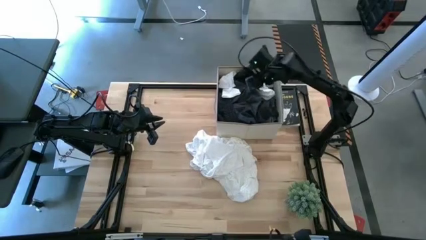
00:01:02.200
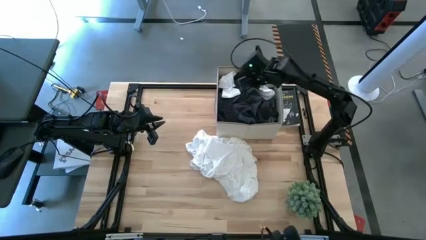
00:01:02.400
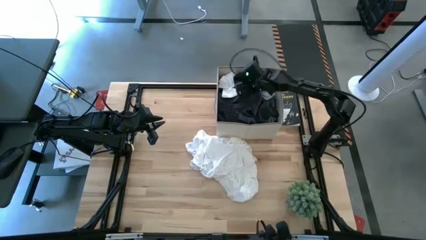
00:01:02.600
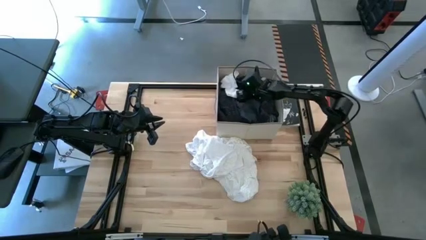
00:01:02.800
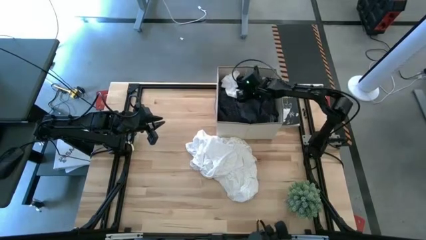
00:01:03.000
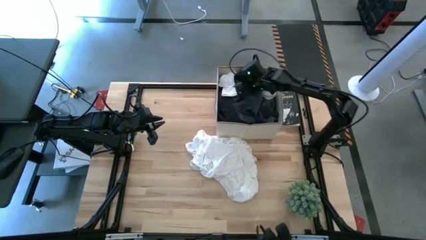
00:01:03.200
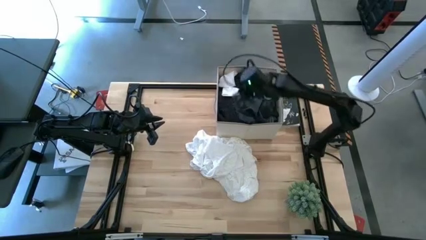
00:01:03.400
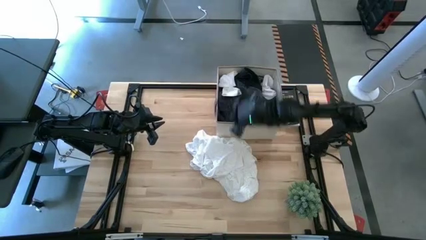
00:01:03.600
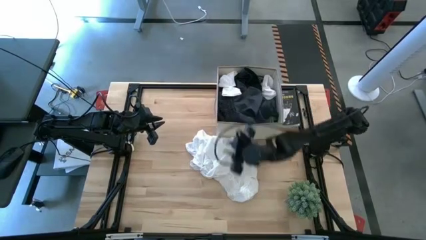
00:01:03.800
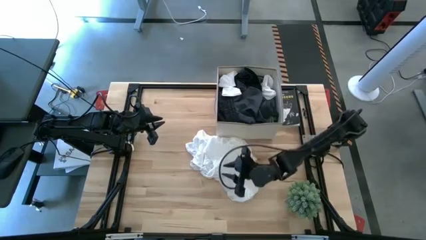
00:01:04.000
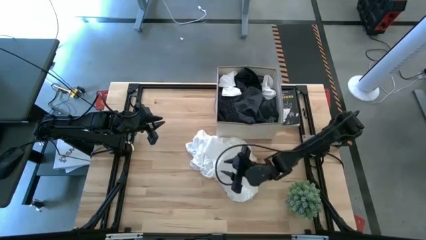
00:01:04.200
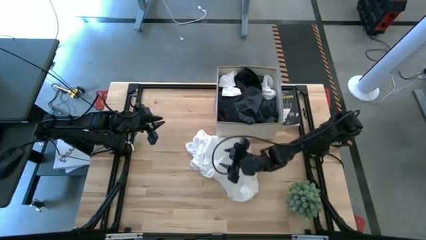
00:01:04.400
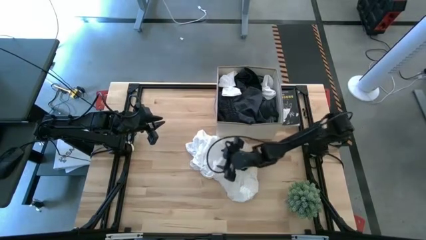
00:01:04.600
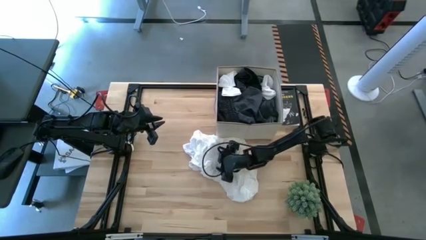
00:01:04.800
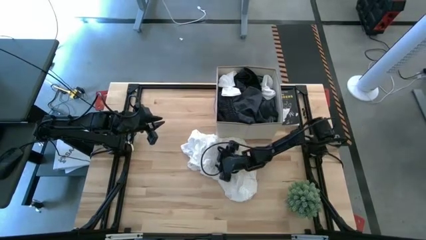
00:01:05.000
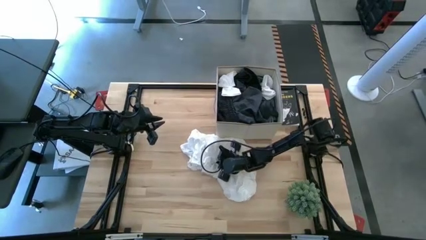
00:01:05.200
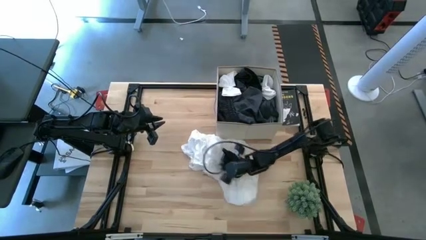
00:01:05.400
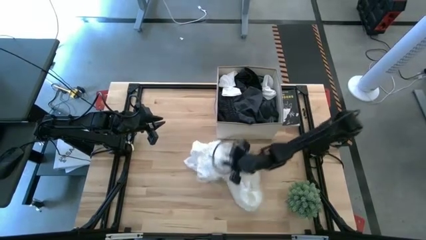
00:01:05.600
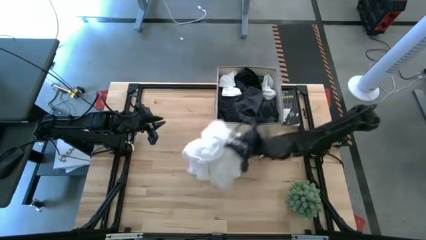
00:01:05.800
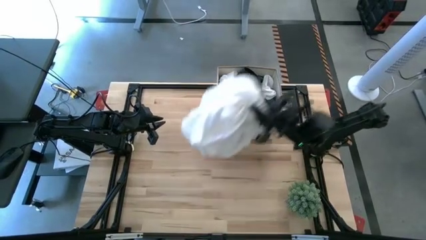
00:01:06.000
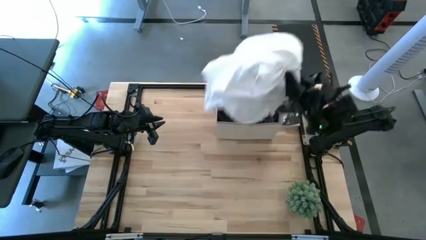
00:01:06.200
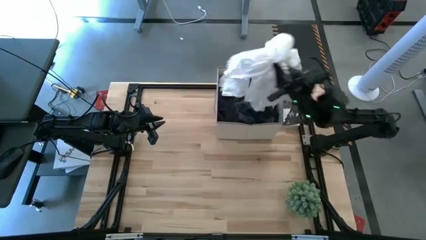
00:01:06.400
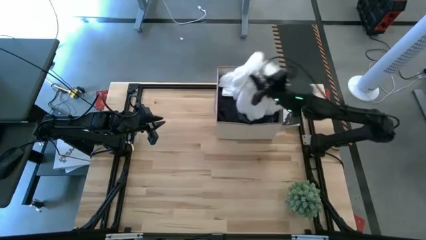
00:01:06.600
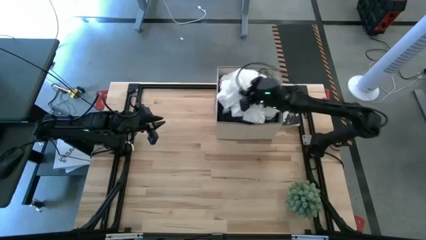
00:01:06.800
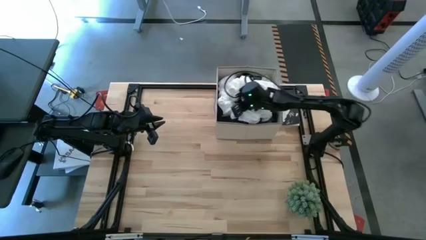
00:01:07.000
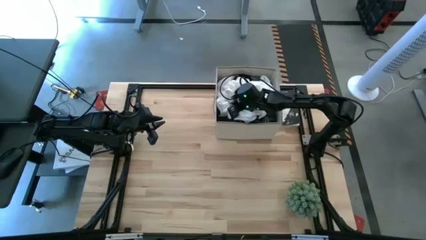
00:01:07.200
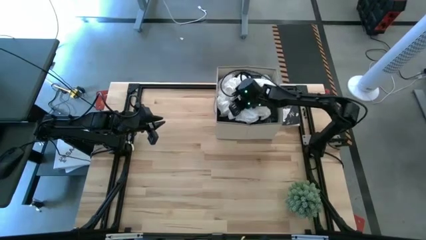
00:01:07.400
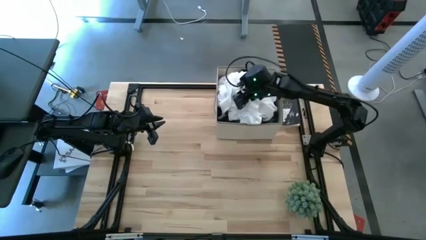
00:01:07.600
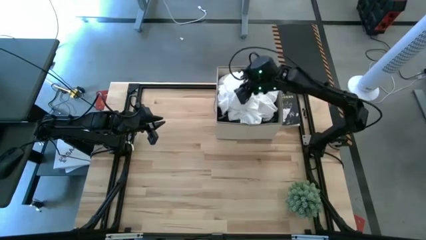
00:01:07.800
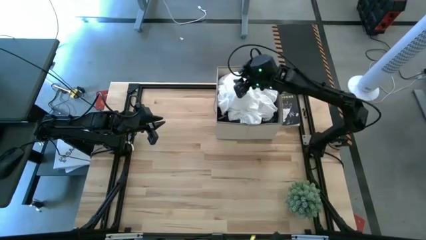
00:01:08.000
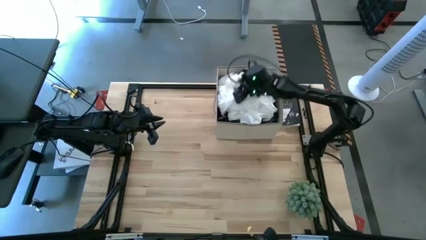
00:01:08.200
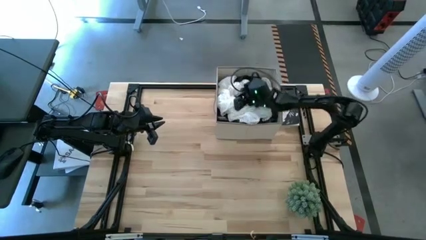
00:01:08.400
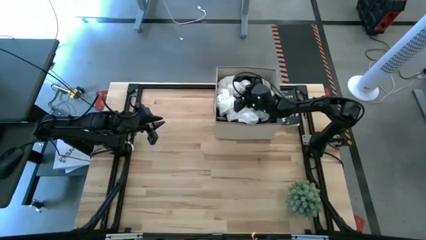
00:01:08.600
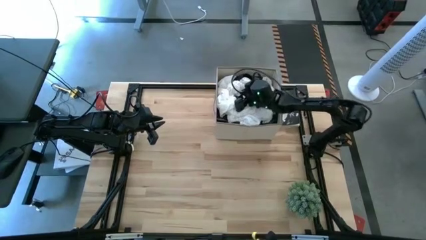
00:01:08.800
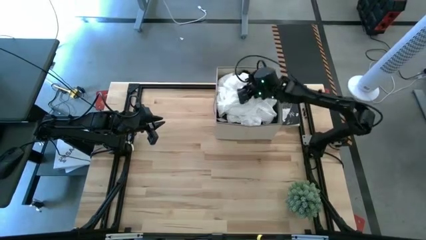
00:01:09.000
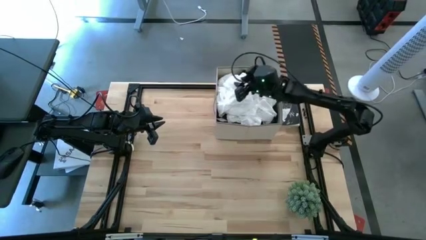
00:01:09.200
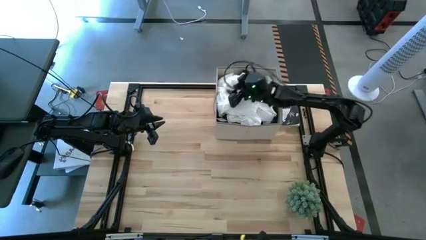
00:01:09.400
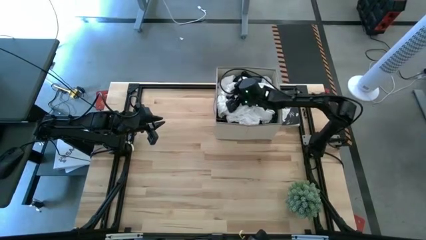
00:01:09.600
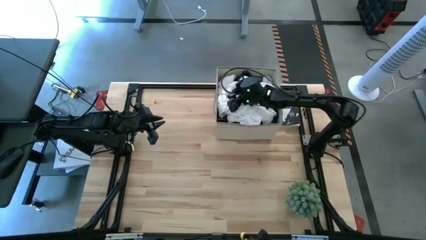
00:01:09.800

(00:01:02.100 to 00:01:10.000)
Task: Sort clothes
Put the white shirt into the laundry organizer

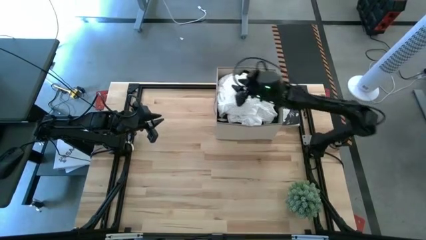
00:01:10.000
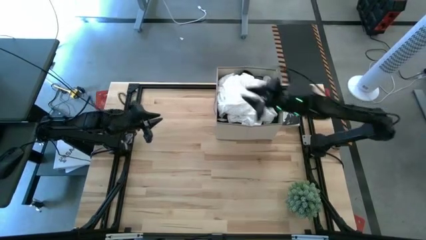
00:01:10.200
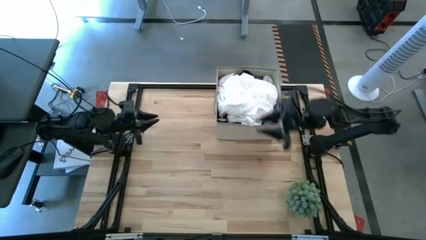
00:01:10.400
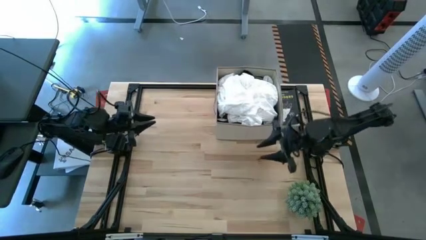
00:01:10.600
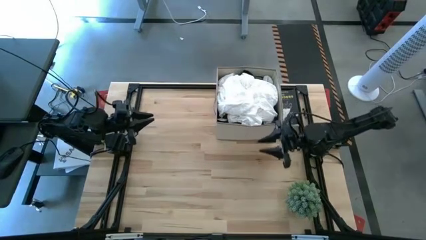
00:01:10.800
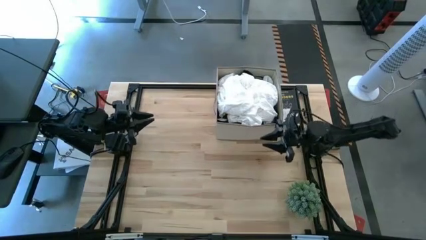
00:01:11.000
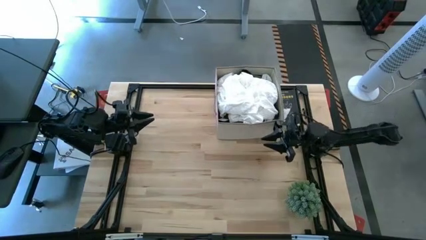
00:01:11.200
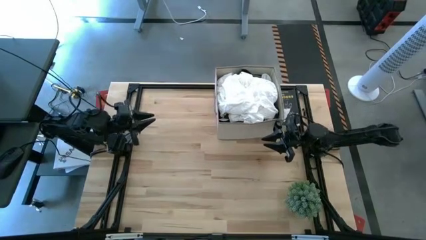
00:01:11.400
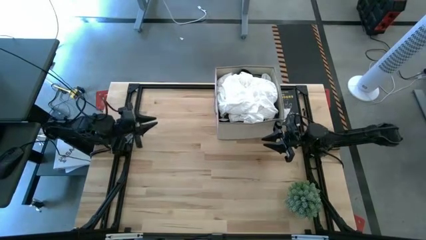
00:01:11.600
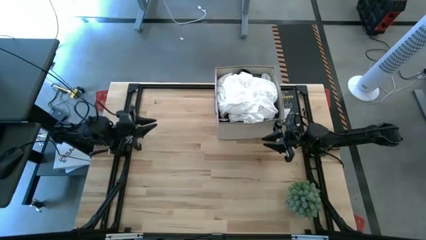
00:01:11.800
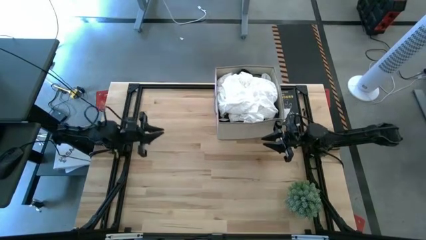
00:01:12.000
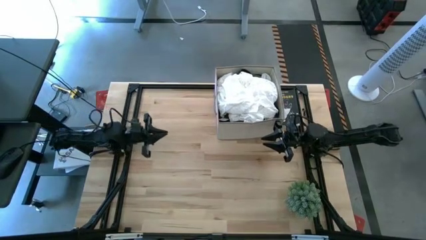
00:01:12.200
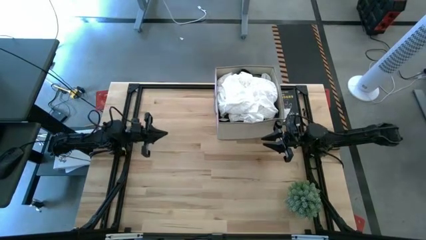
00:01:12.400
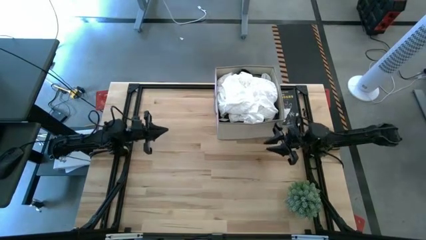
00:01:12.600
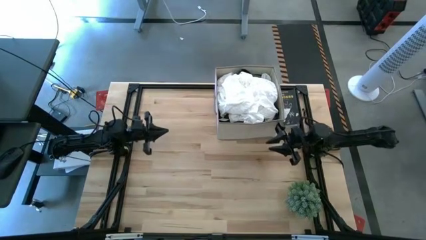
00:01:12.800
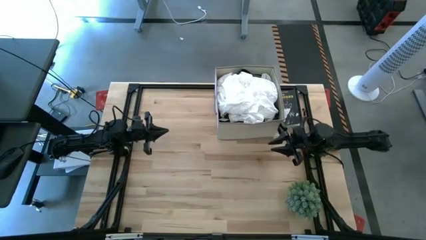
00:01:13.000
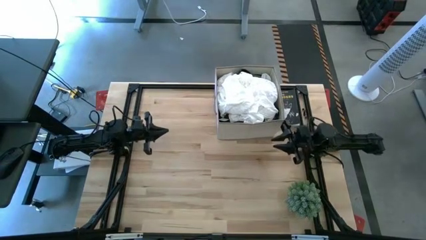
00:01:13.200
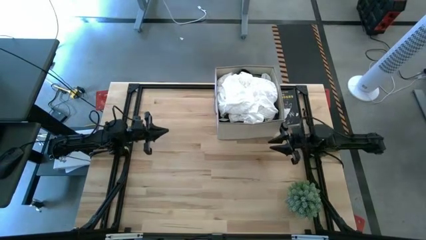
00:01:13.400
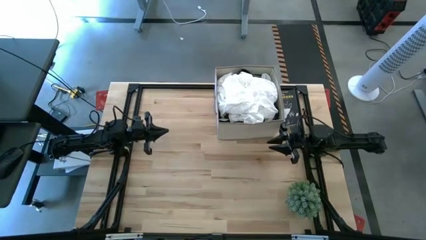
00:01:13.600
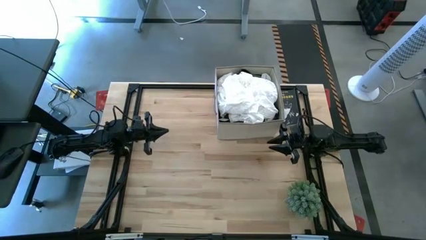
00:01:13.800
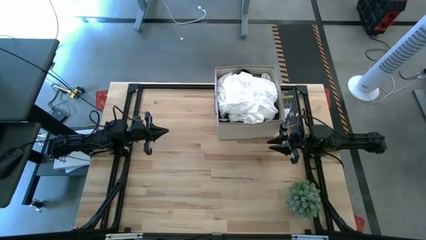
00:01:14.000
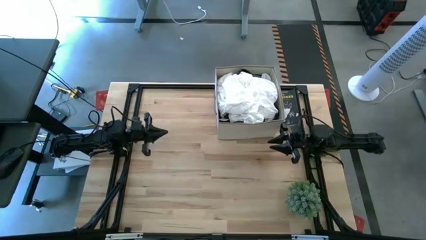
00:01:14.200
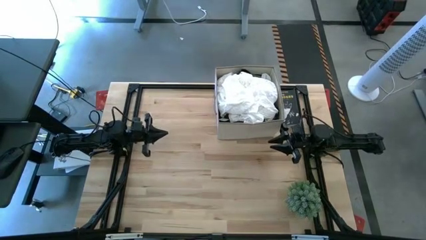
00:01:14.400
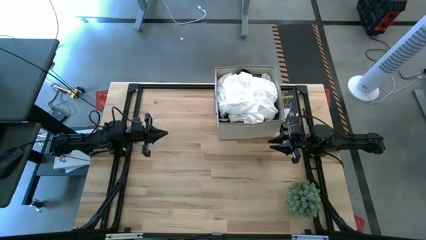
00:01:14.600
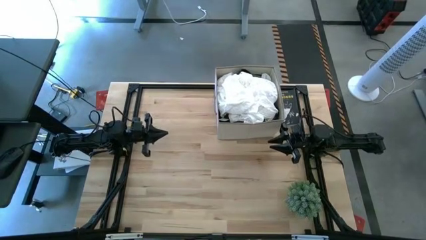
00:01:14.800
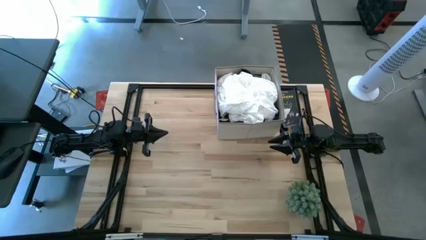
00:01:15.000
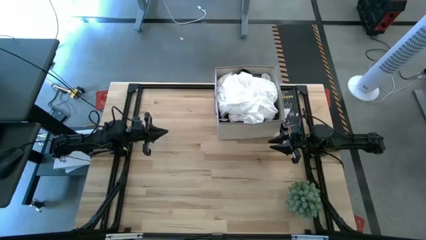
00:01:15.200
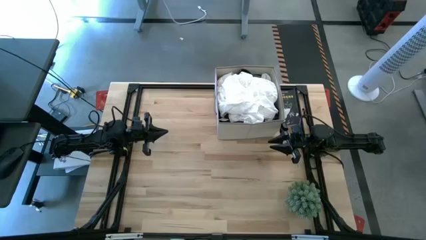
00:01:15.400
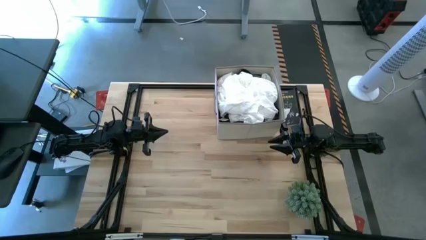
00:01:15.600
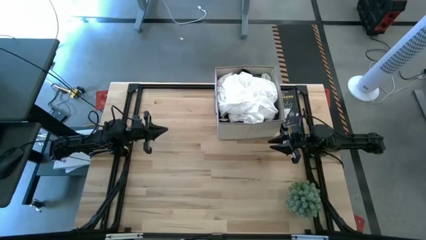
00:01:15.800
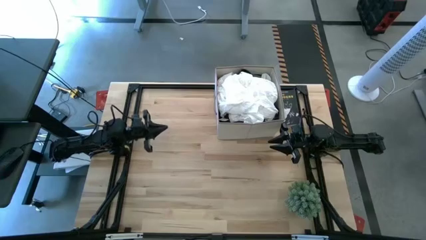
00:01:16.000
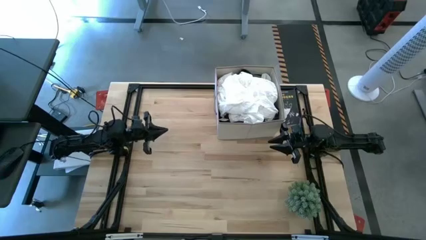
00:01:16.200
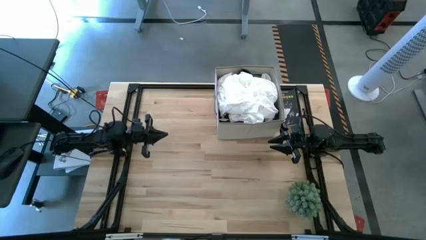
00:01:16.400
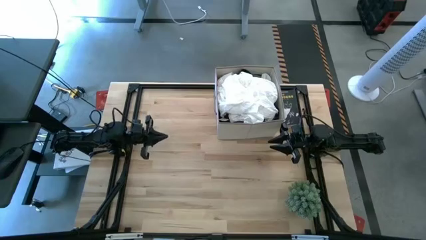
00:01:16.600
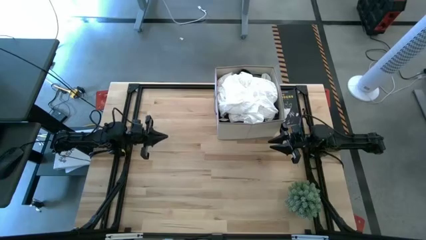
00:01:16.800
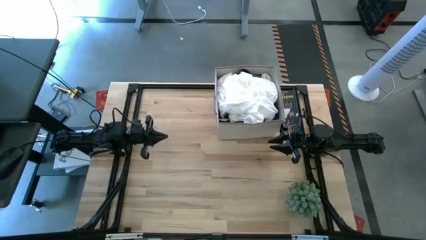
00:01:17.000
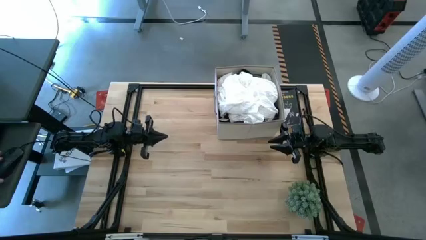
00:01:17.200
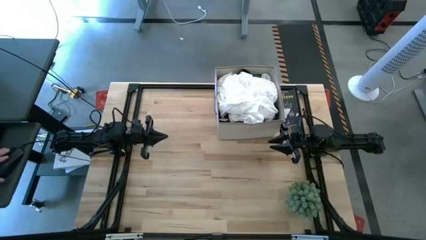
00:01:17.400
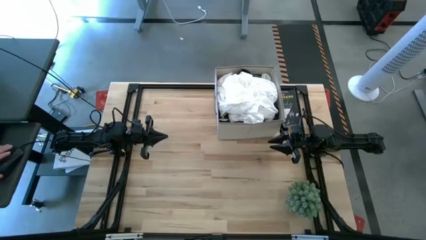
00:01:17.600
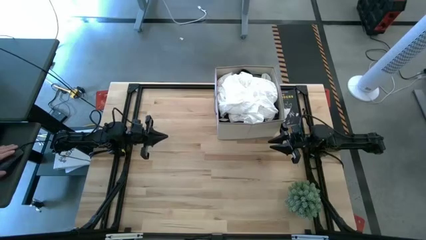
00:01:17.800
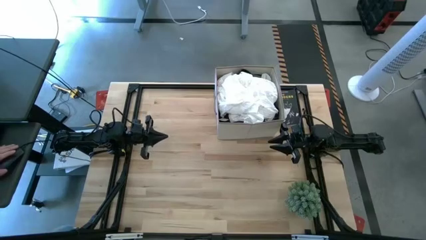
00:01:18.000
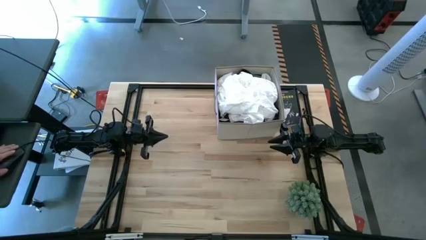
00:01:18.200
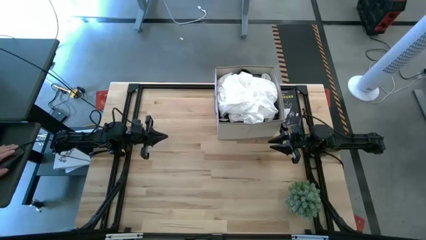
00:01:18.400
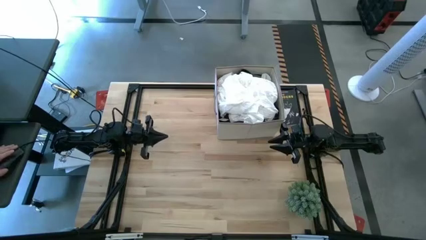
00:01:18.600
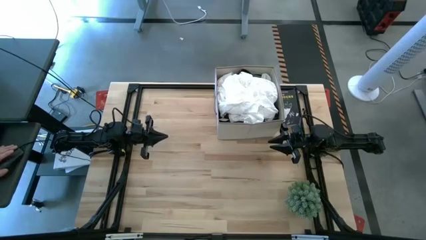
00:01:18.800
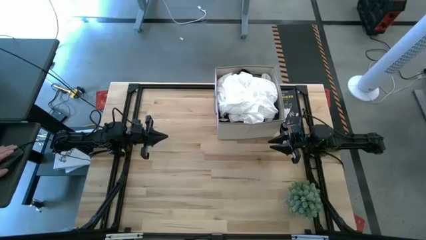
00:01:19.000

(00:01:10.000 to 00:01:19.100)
Return to Home Position
